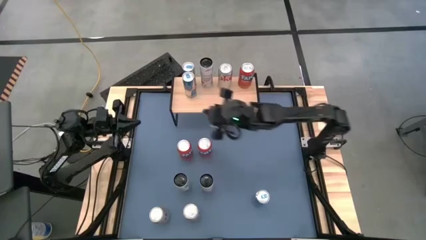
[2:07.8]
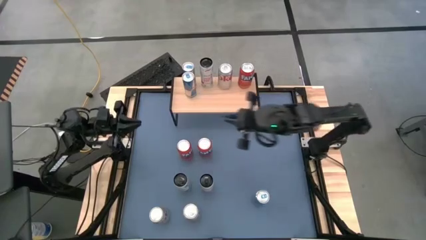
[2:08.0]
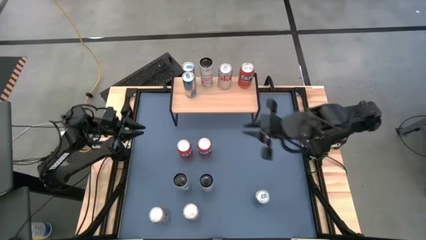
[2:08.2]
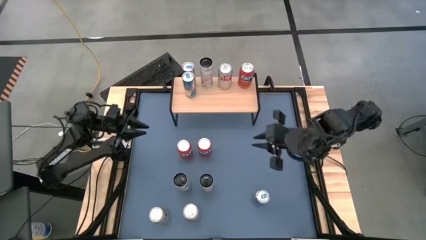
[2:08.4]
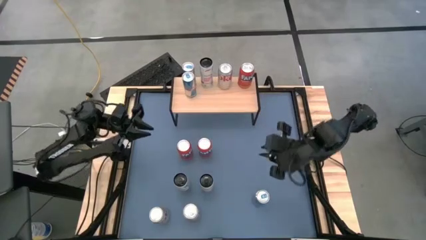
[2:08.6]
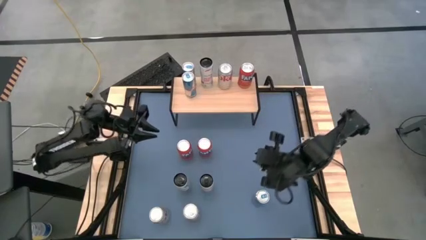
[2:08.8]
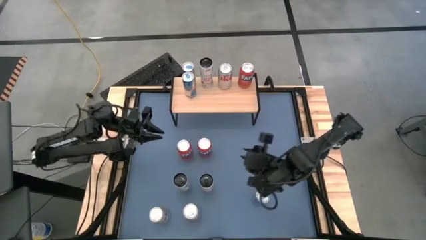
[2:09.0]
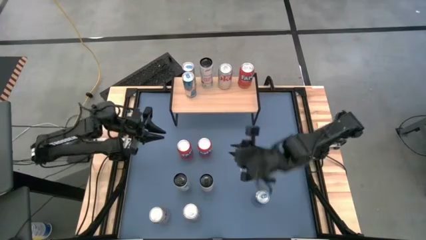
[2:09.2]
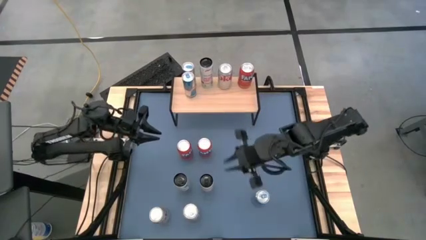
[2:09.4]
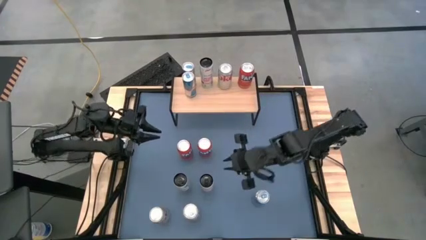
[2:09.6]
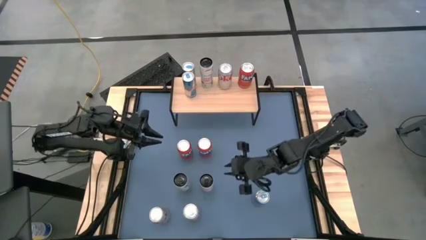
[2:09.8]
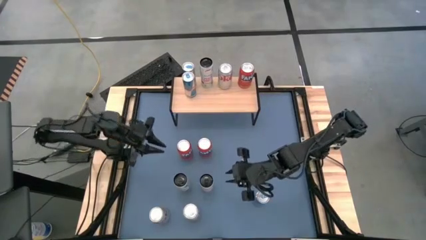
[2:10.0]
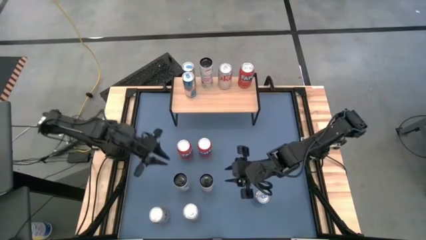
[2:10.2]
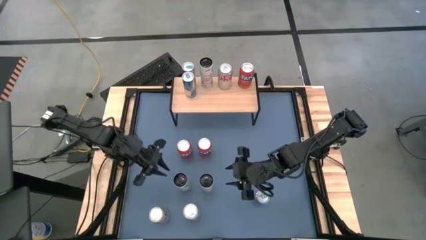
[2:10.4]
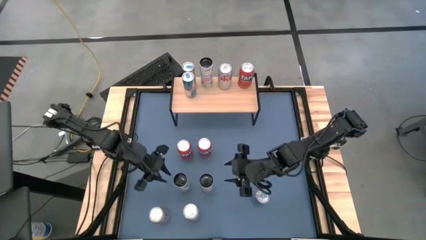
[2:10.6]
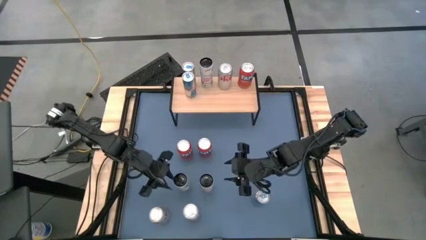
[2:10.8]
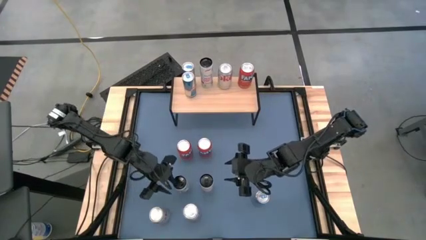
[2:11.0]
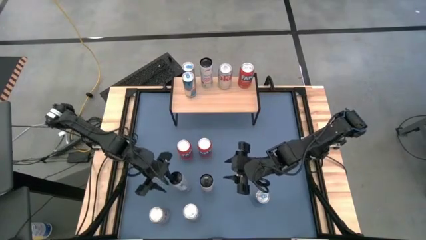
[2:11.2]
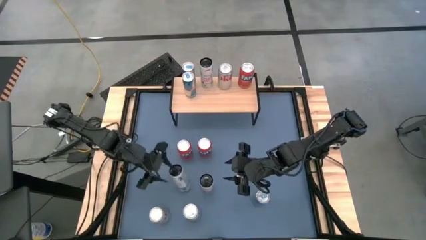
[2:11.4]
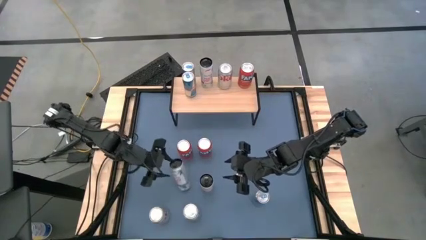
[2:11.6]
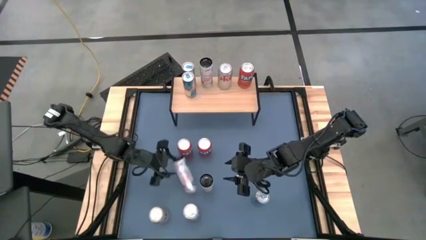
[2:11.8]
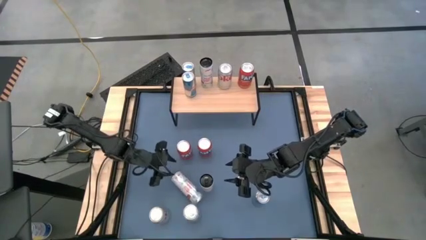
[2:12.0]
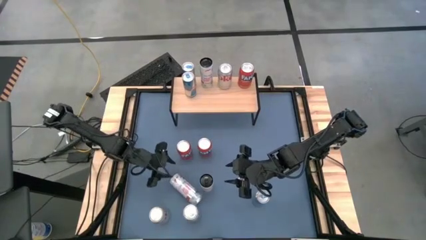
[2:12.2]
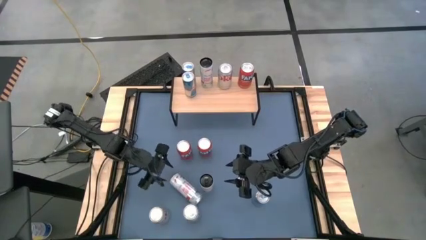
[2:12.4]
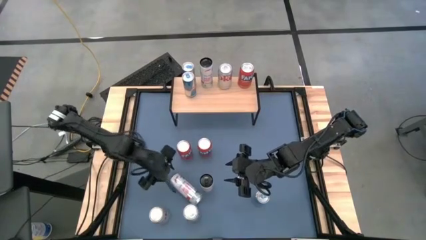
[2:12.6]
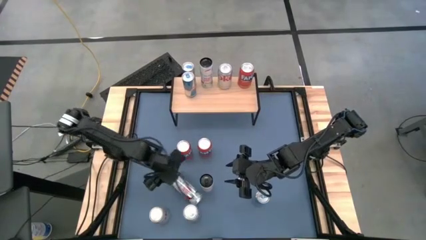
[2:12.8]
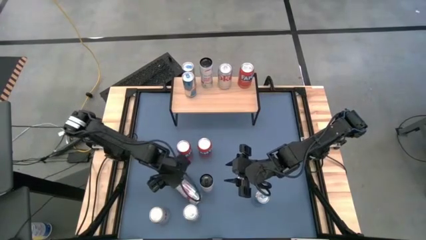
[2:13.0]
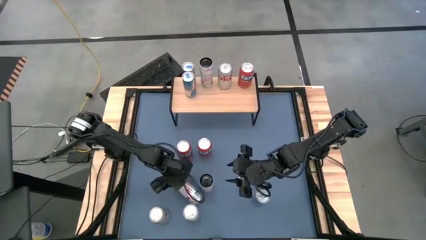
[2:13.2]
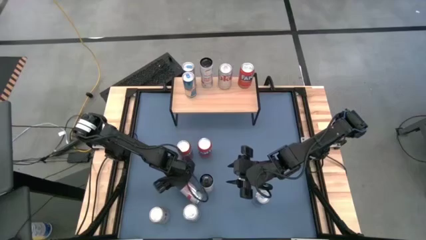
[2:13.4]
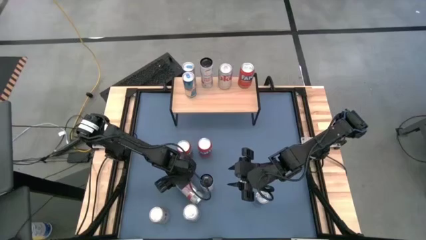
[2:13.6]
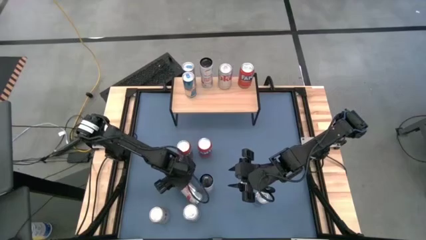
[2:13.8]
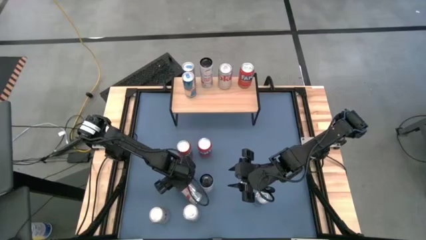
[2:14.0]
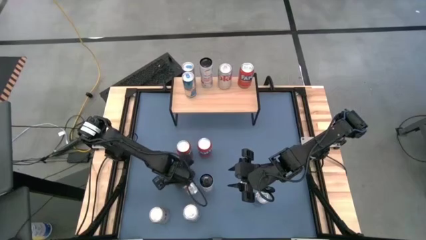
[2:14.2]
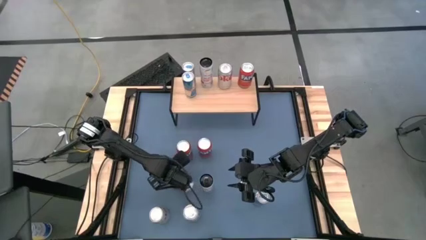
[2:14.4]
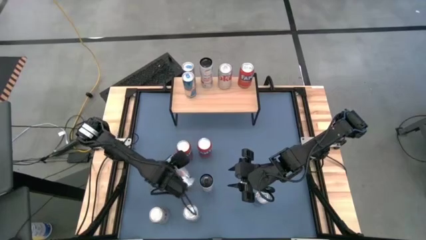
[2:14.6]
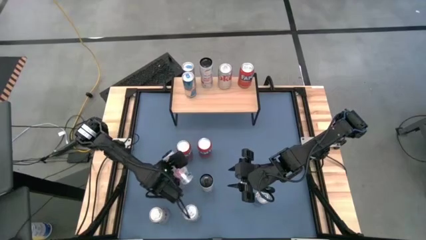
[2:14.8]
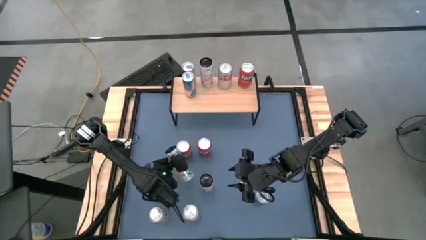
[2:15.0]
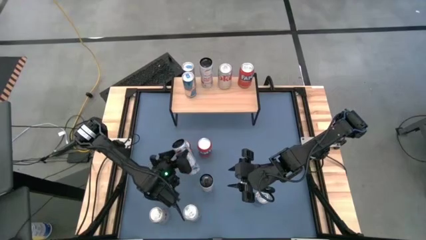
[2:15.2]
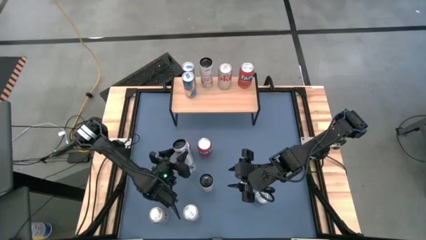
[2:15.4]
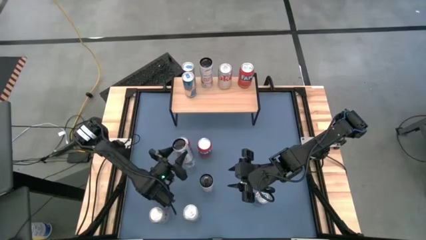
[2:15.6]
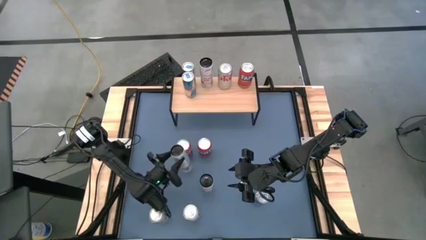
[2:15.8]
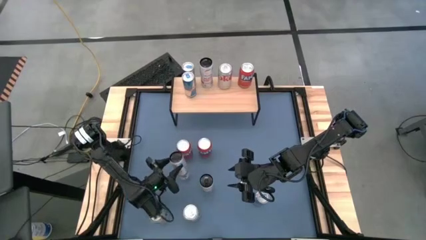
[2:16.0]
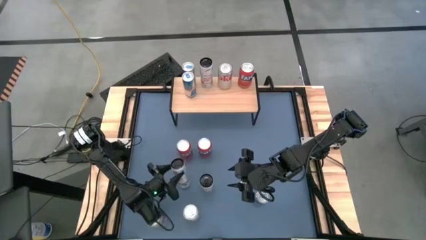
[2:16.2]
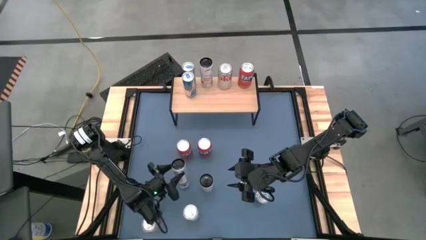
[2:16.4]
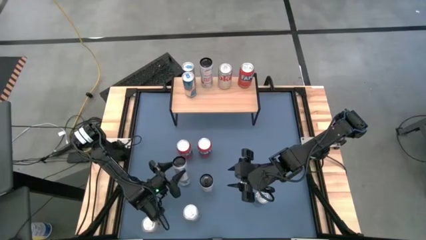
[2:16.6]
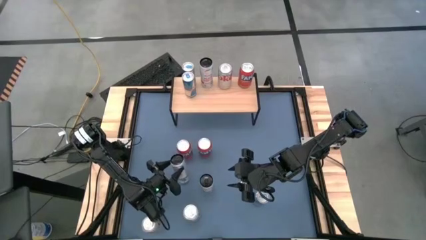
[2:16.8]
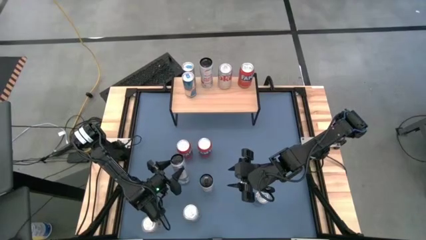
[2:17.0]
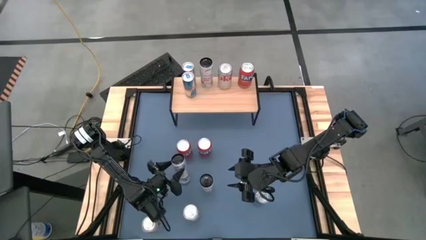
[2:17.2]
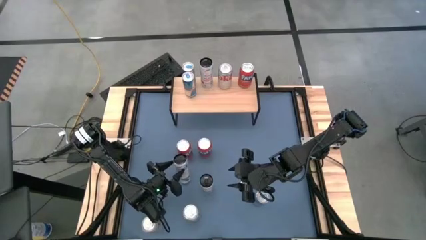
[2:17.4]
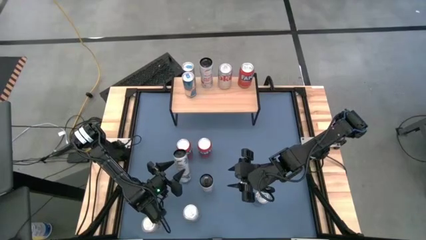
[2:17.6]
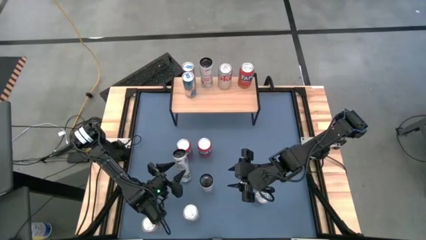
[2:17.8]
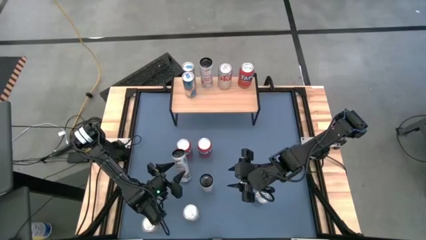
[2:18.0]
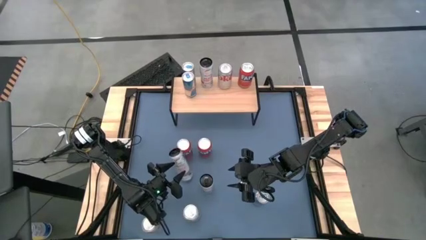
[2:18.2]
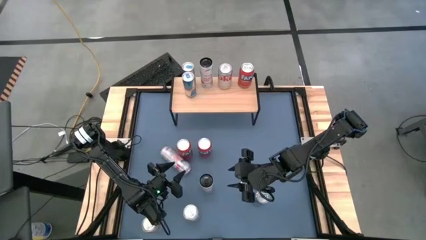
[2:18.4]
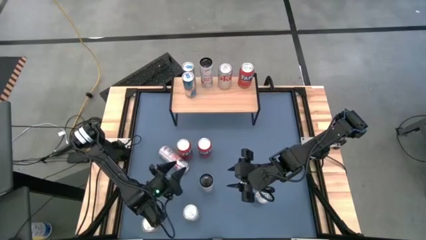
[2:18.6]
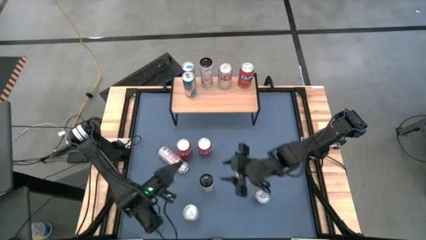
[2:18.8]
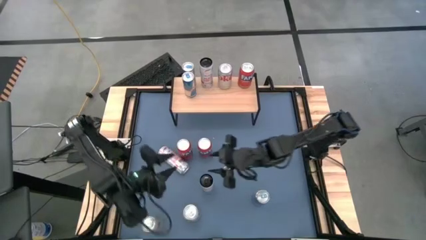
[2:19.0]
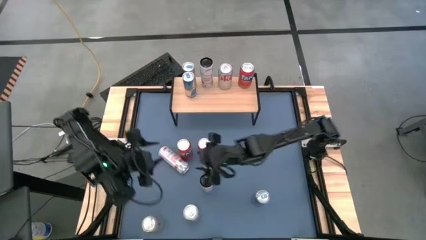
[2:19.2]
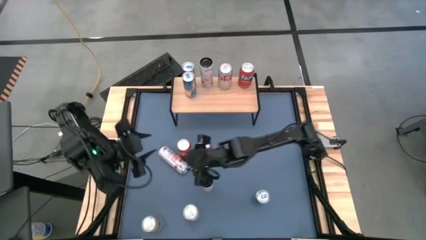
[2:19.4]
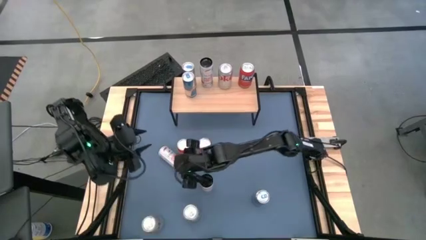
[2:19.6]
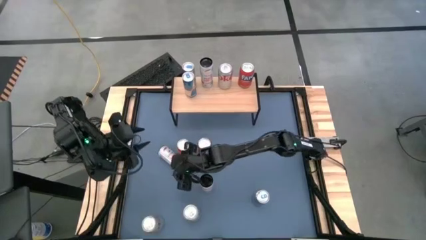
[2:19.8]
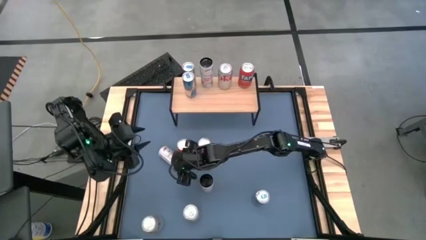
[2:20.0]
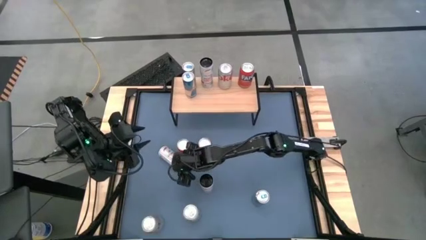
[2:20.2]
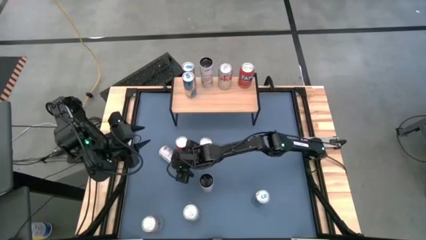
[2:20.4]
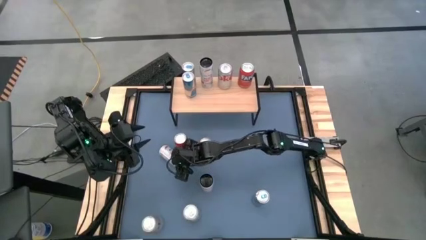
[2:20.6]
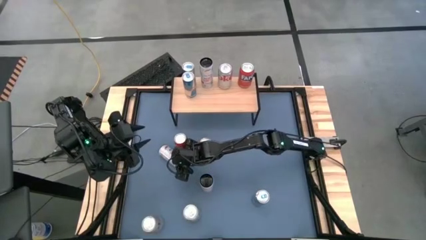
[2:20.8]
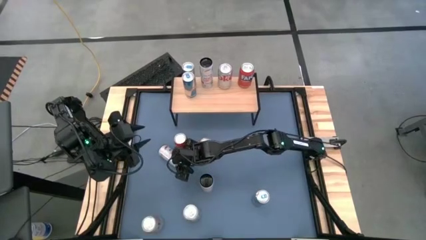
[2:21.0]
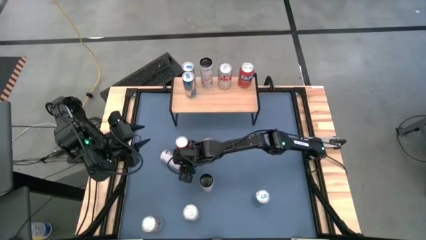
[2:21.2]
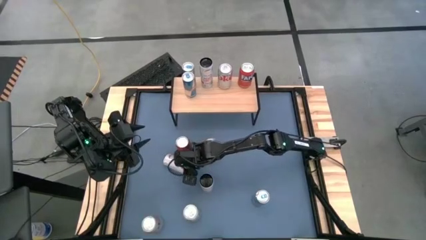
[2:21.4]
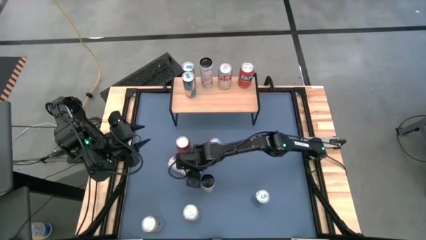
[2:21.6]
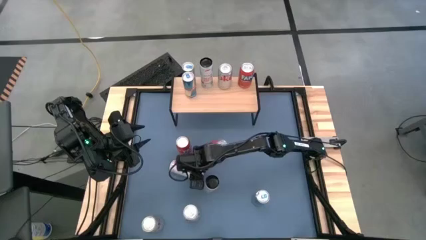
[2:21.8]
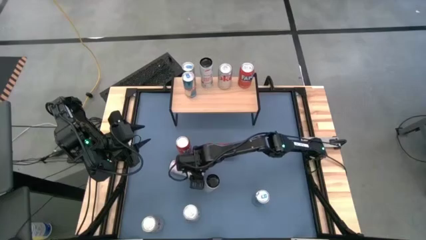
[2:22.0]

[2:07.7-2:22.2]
Task: Place canned beverage on shelf
Put the left pink soda can on the shelf aligned with the other pink soda can
